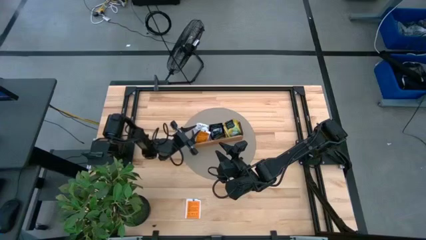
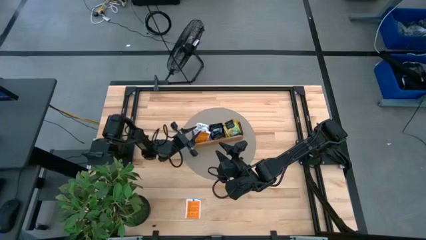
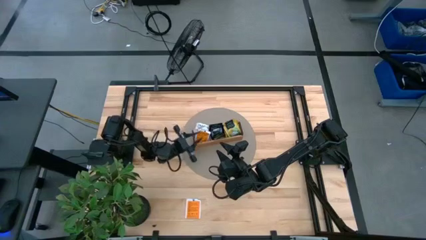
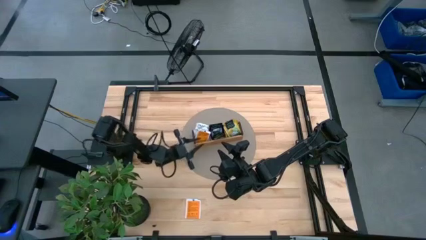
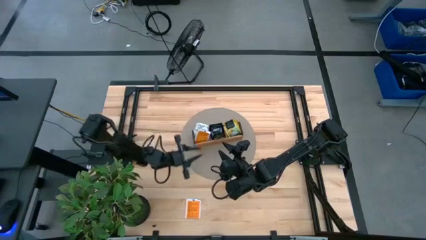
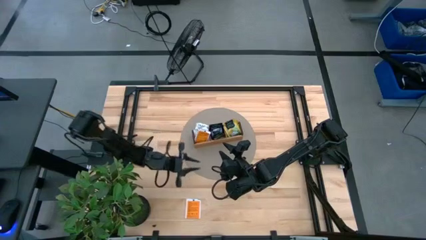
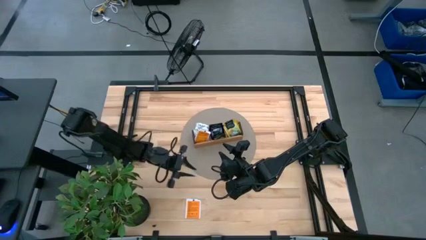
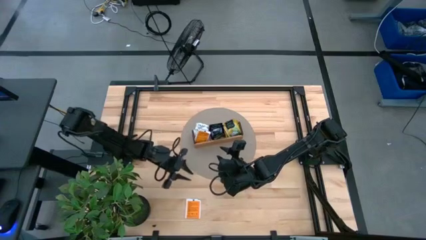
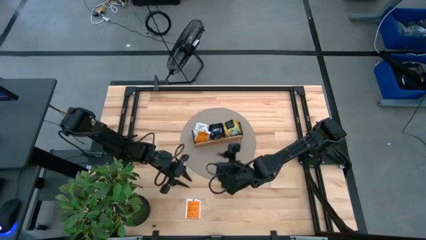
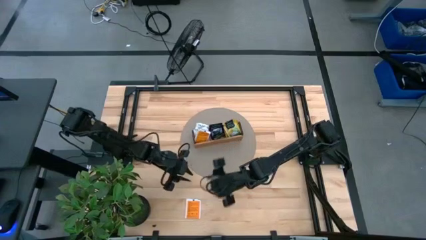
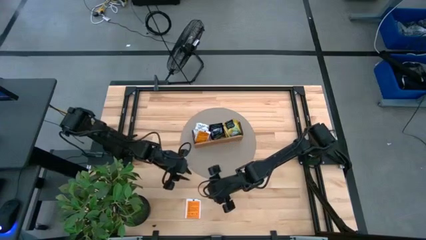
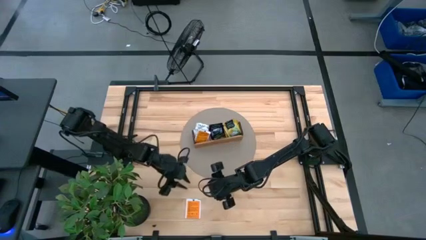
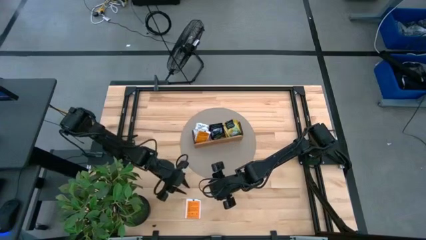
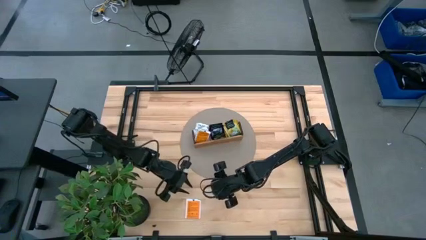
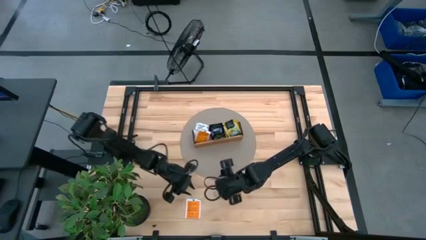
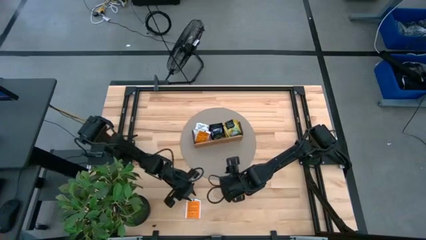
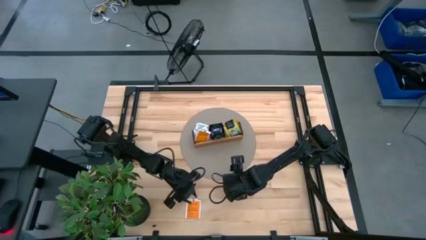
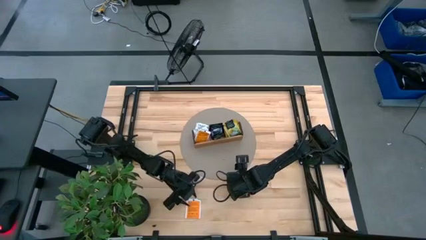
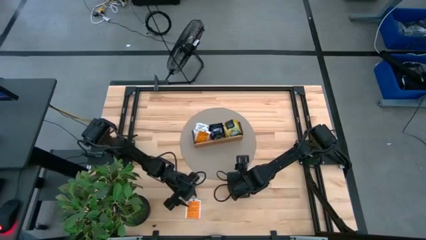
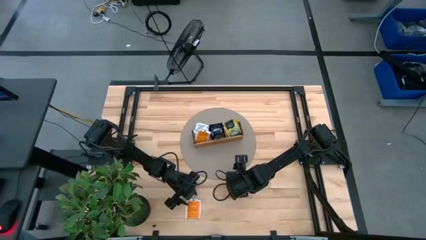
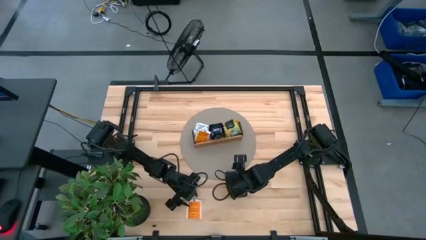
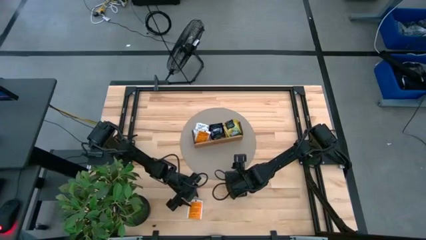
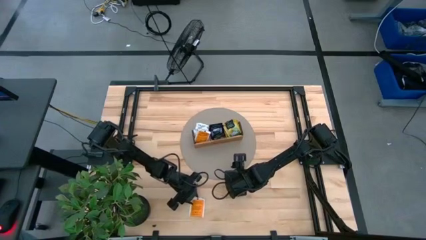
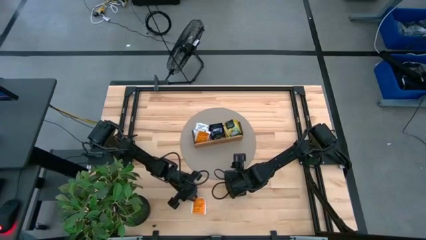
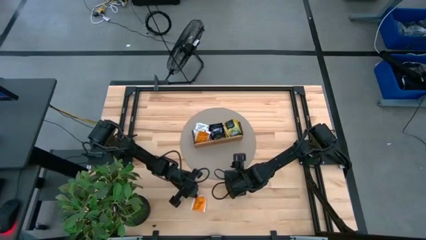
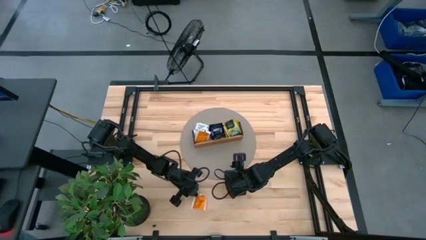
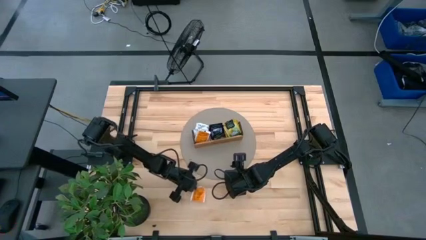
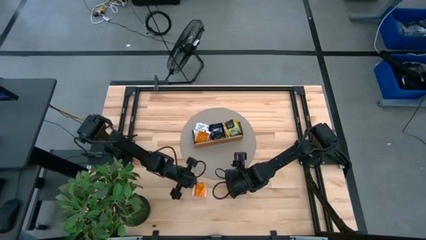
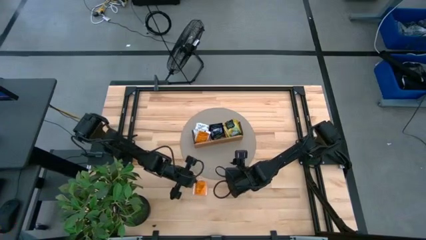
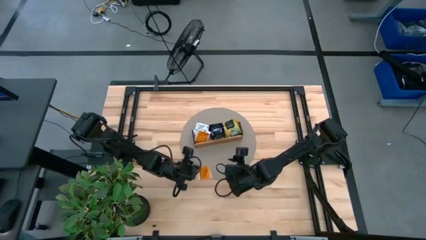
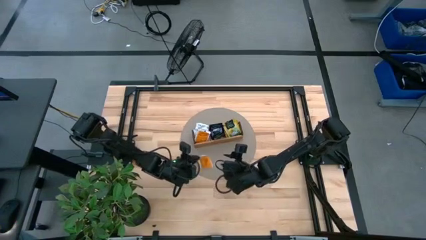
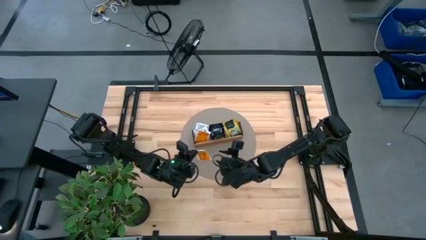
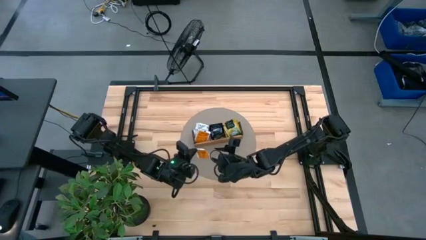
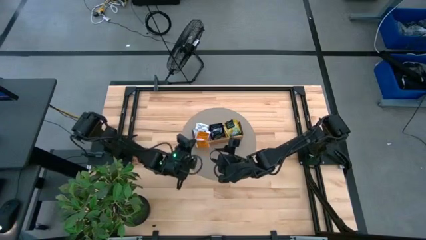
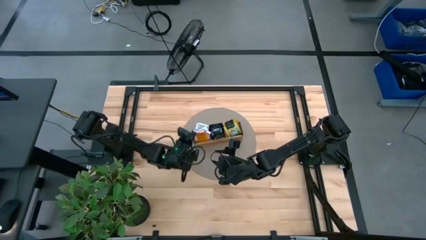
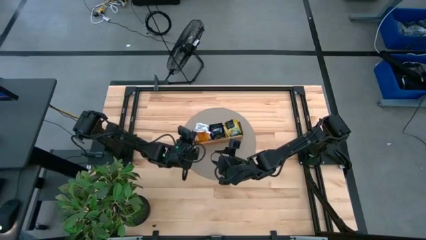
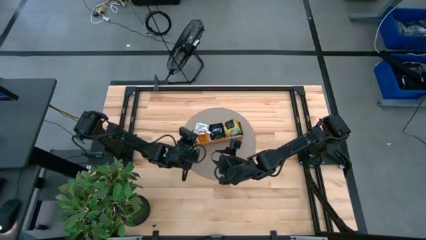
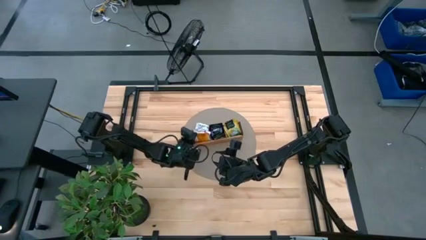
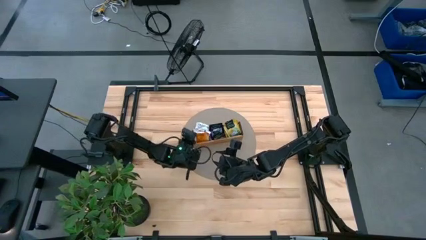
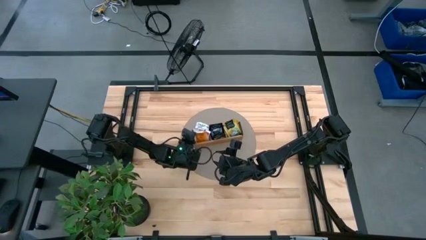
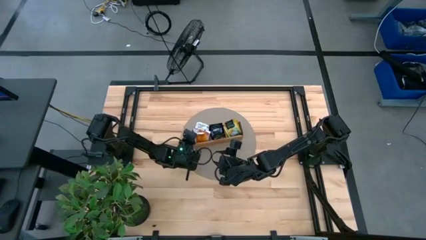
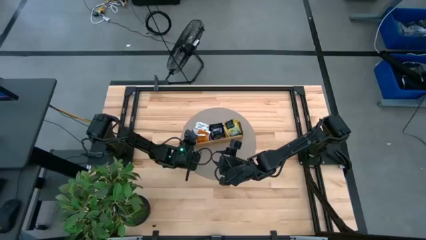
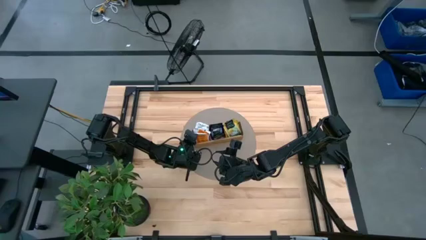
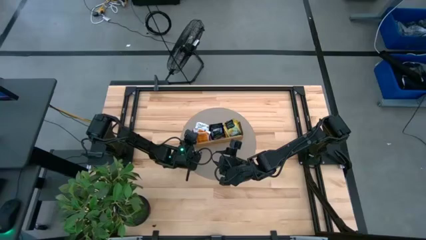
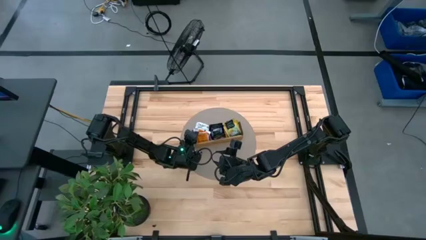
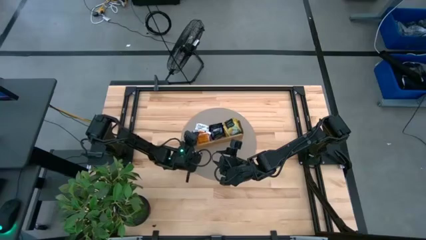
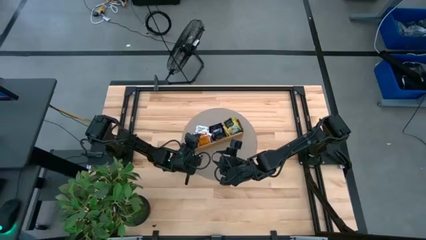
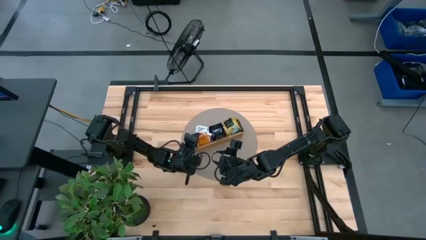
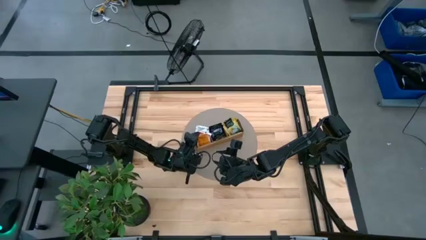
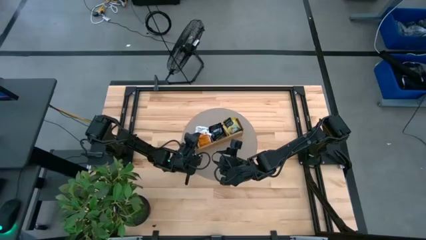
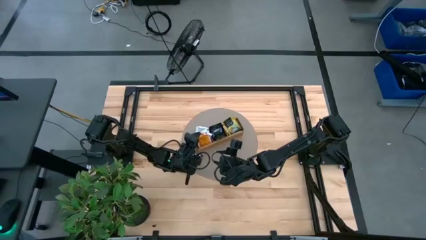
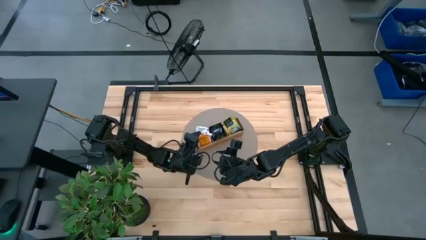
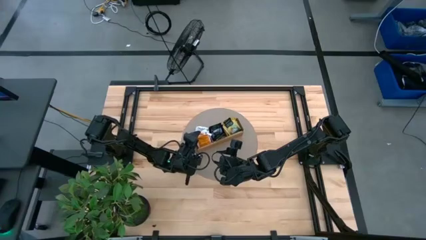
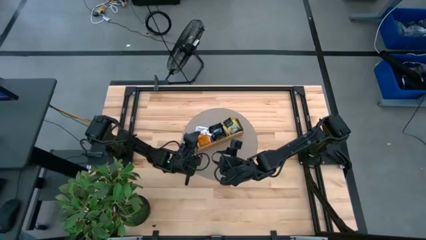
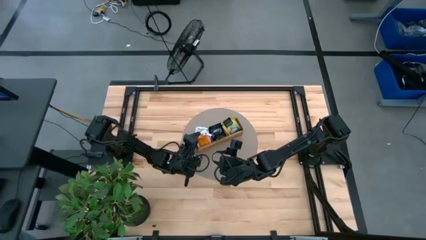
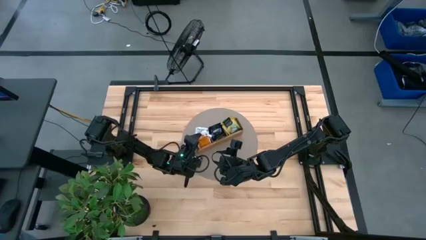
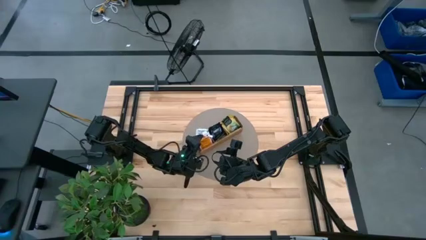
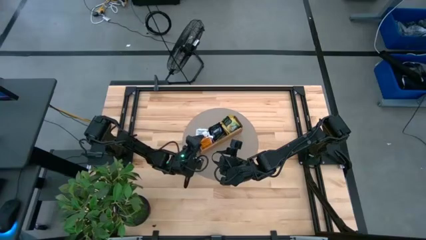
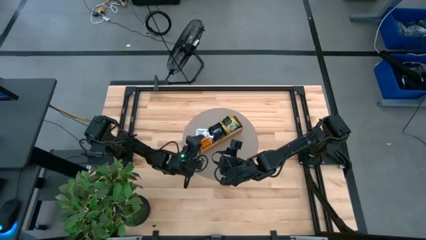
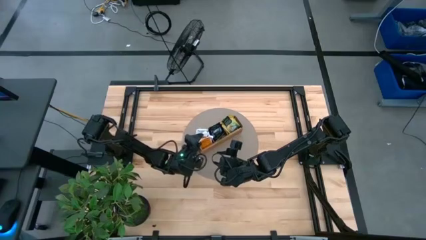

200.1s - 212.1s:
Task: Pick & Place Tea
Put the white tea bag into the left section of the wooden organizer

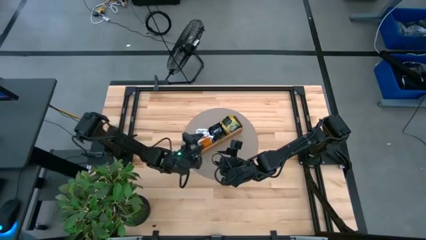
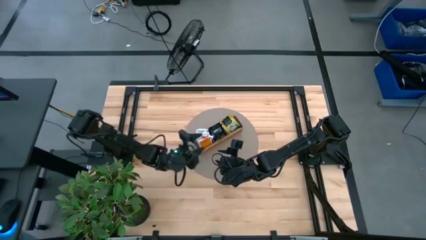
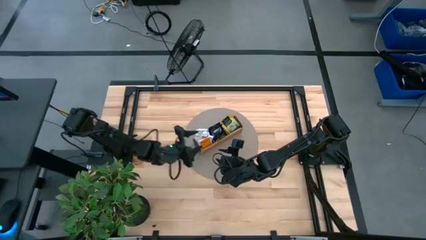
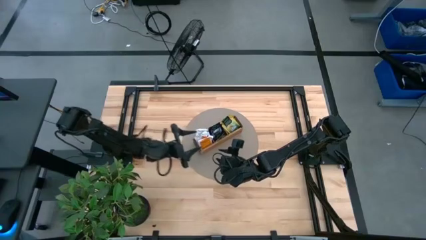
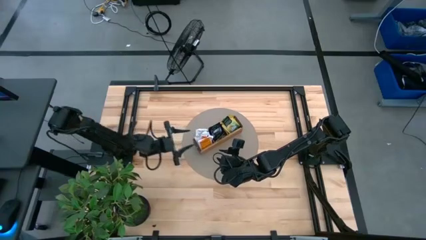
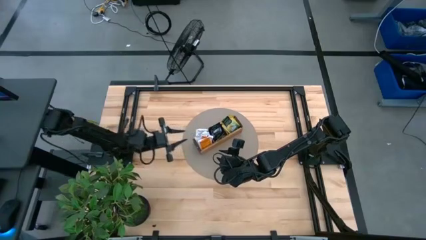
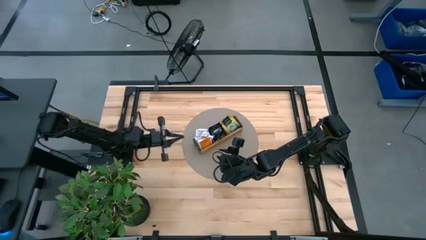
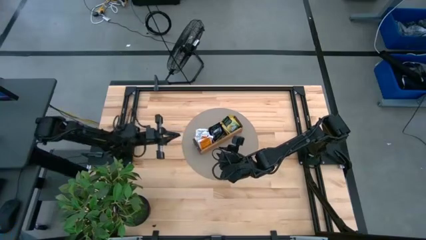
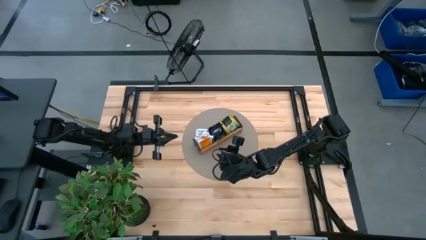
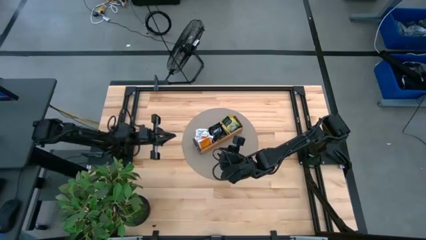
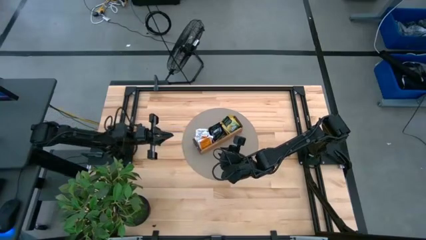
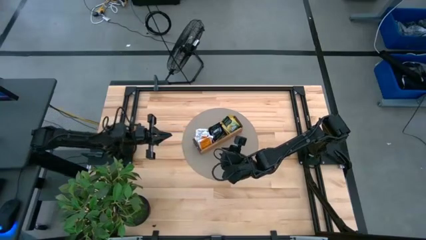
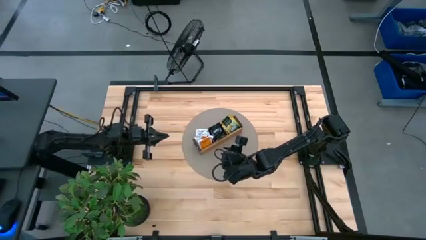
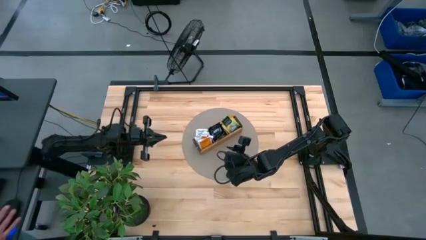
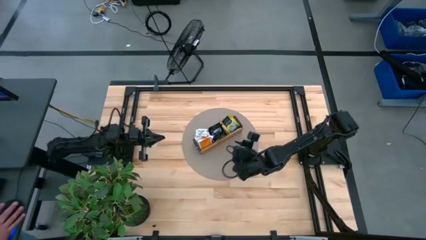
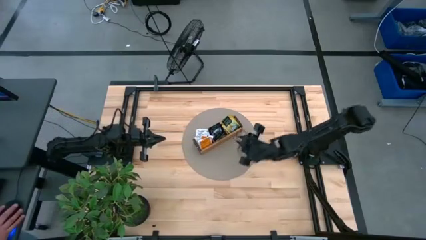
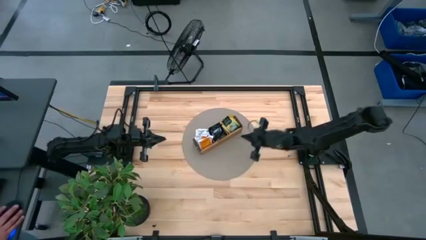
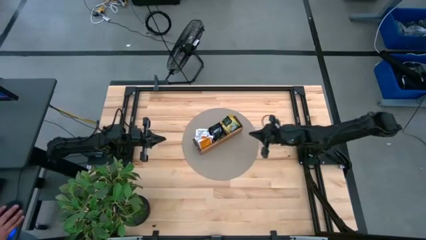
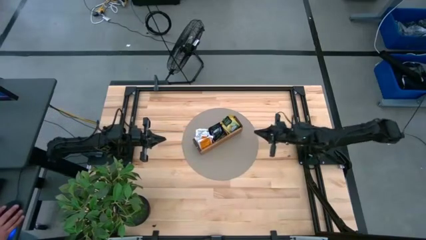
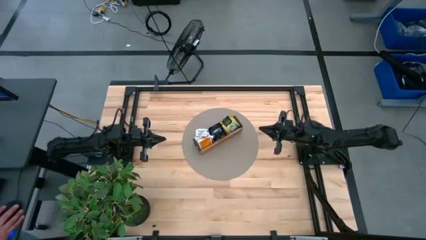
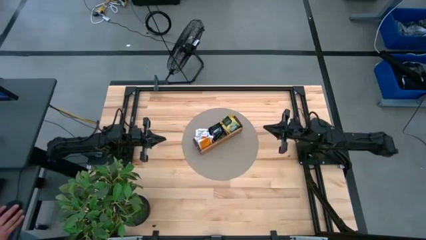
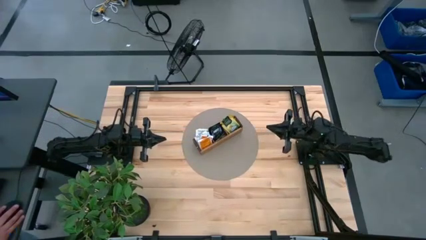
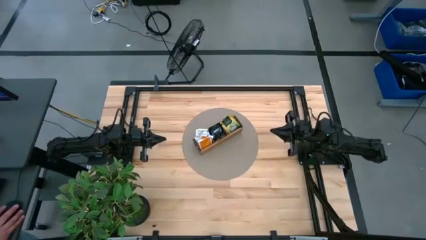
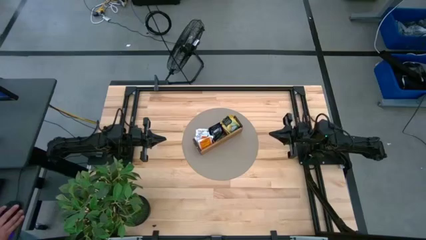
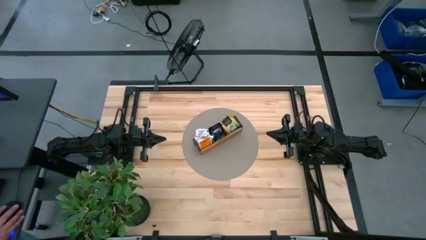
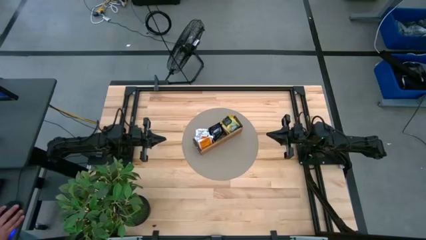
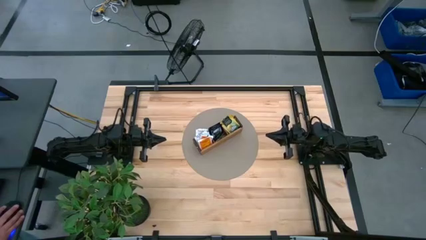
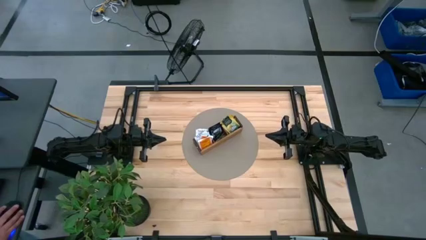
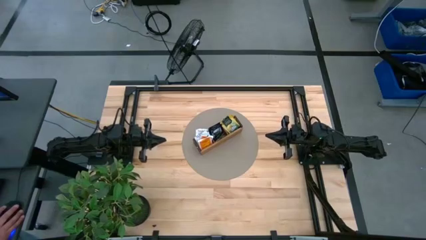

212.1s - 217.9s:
Return to Home Position
